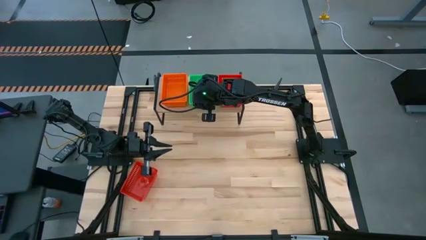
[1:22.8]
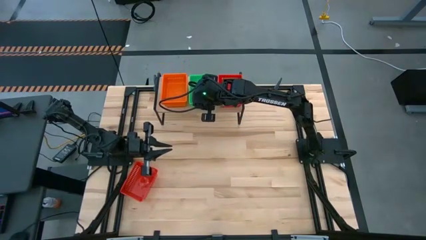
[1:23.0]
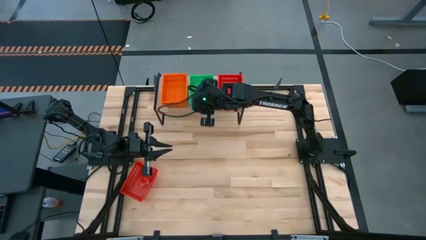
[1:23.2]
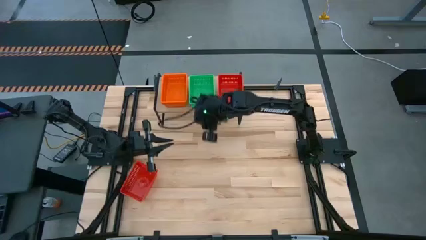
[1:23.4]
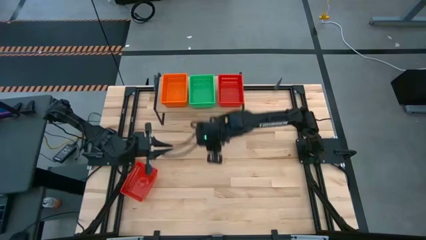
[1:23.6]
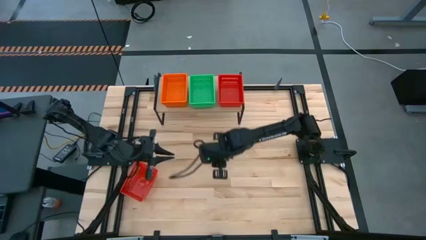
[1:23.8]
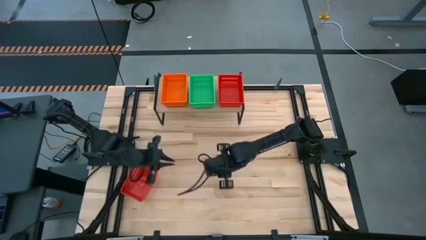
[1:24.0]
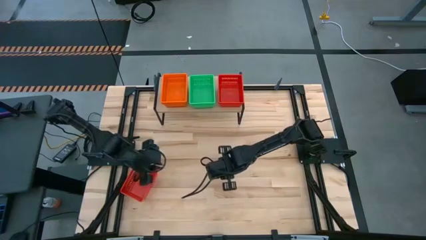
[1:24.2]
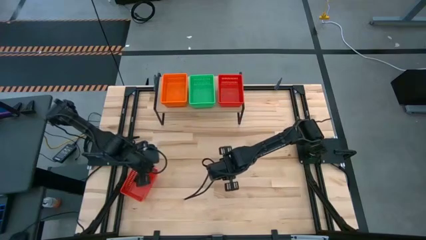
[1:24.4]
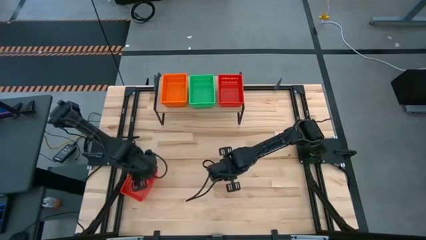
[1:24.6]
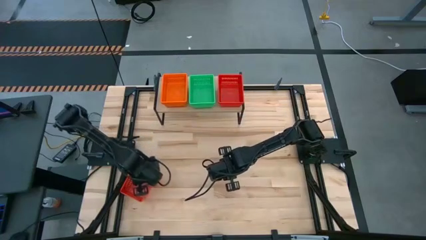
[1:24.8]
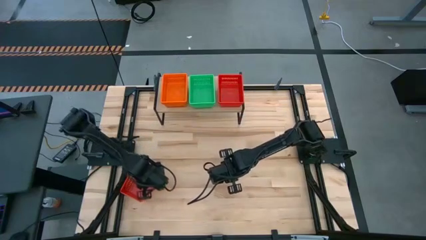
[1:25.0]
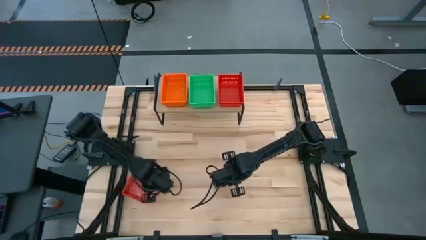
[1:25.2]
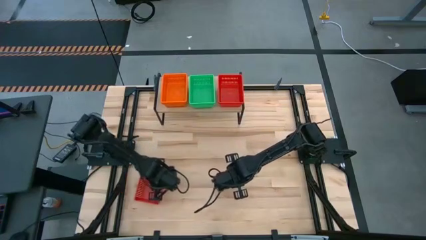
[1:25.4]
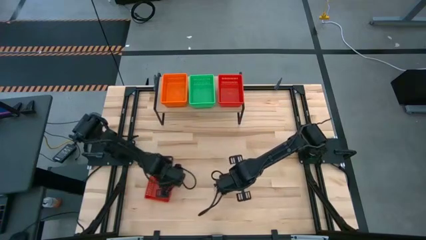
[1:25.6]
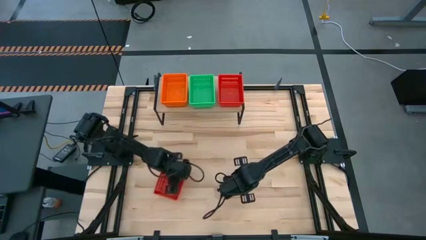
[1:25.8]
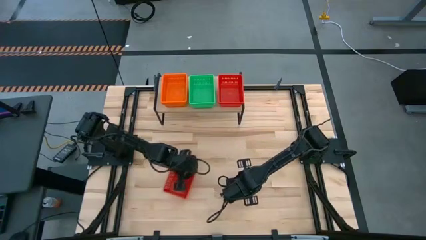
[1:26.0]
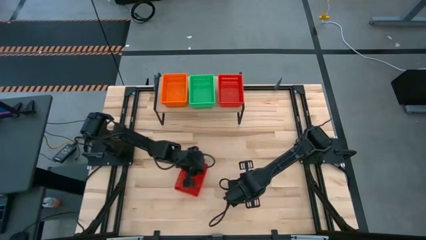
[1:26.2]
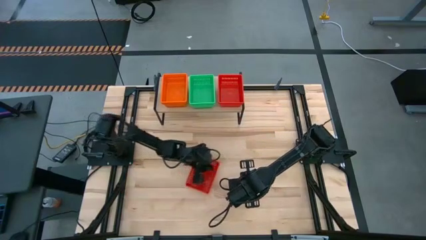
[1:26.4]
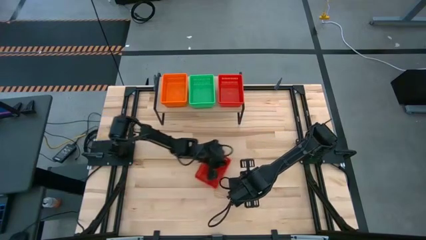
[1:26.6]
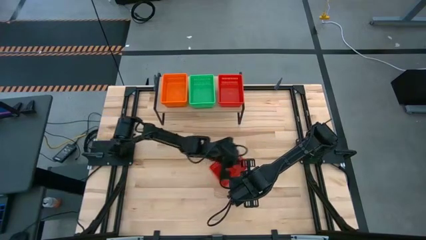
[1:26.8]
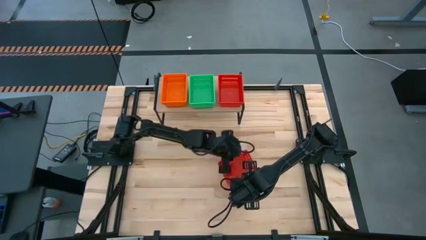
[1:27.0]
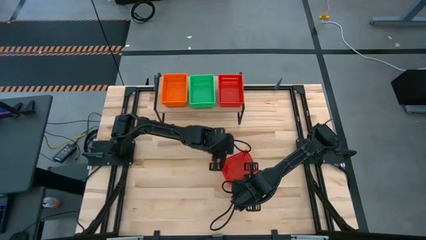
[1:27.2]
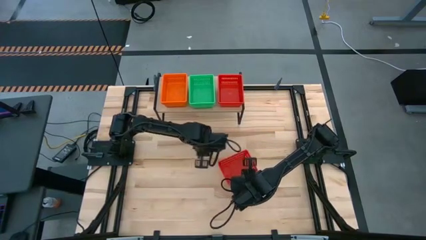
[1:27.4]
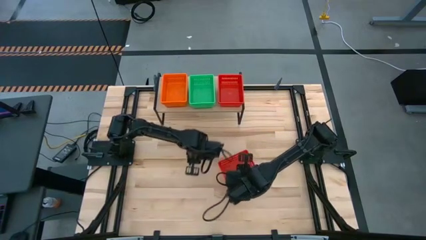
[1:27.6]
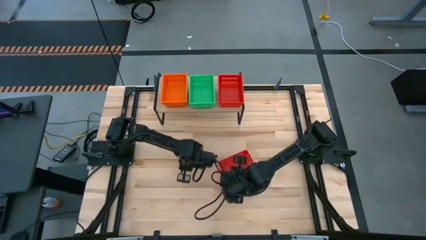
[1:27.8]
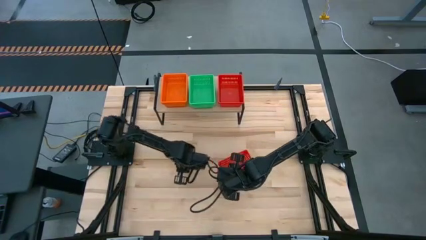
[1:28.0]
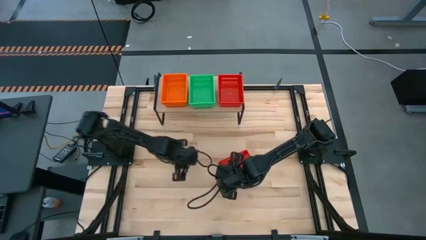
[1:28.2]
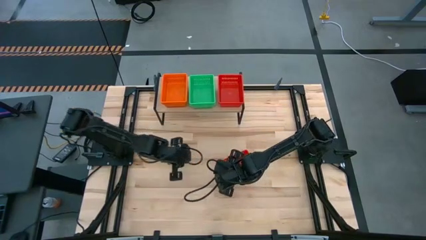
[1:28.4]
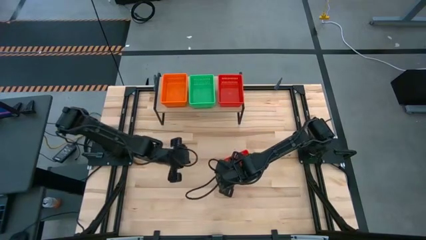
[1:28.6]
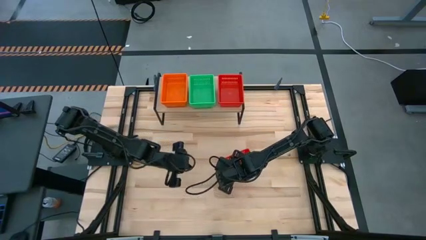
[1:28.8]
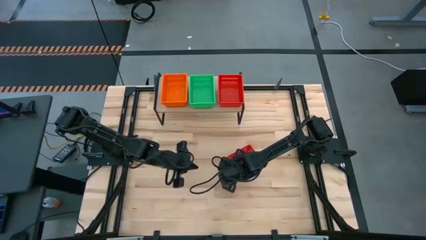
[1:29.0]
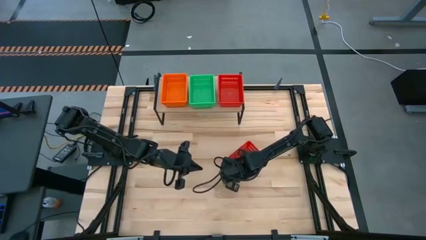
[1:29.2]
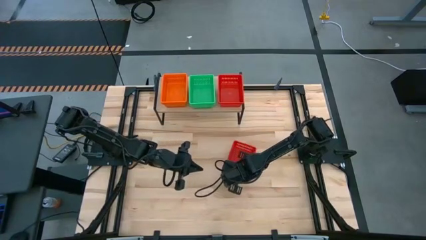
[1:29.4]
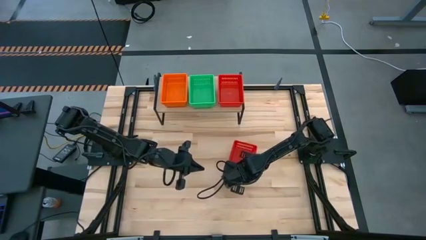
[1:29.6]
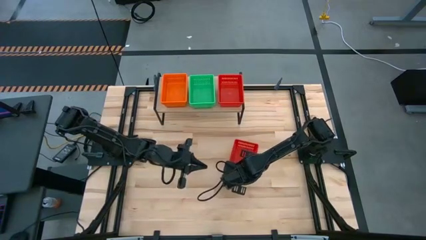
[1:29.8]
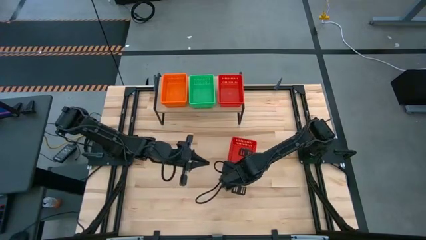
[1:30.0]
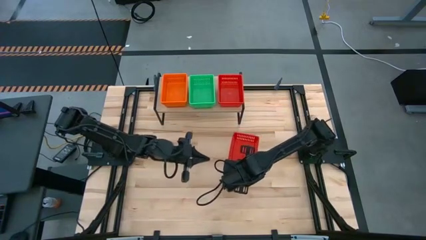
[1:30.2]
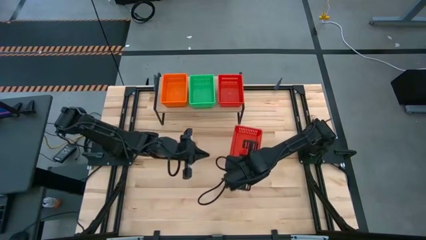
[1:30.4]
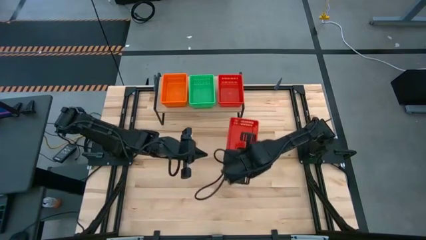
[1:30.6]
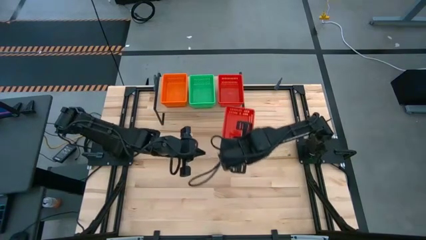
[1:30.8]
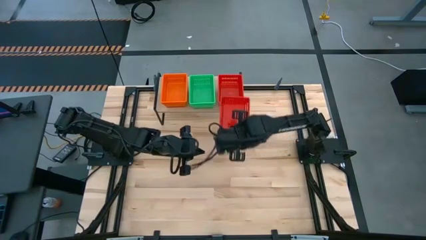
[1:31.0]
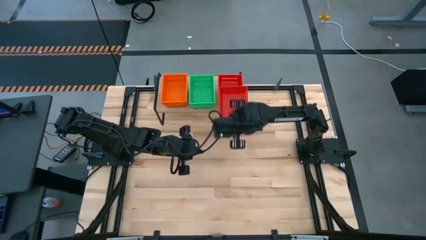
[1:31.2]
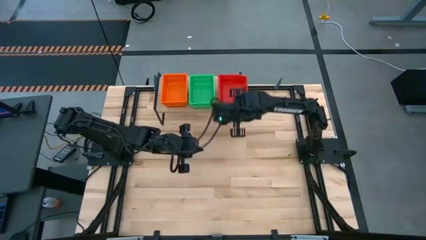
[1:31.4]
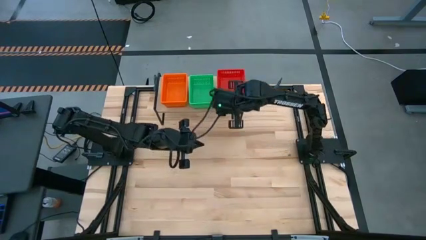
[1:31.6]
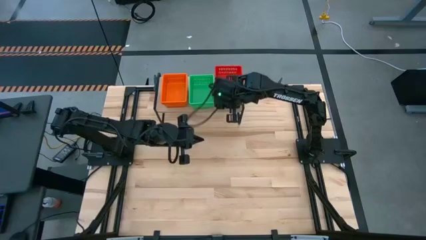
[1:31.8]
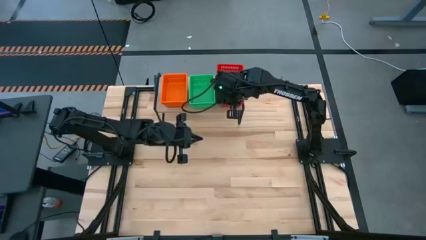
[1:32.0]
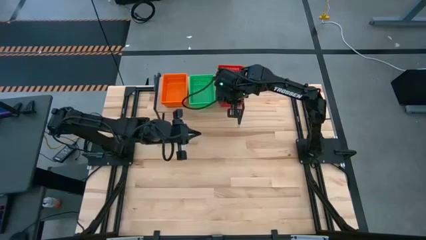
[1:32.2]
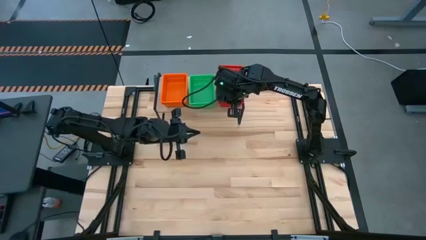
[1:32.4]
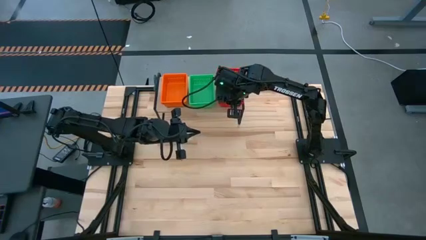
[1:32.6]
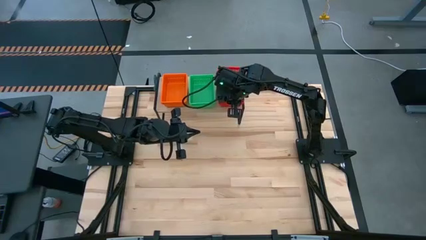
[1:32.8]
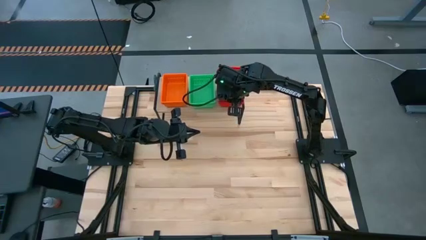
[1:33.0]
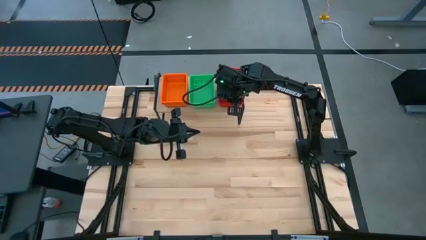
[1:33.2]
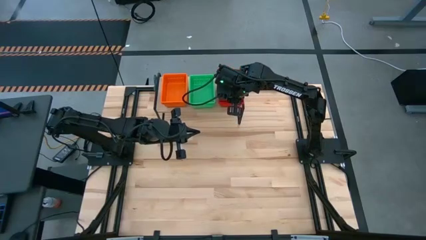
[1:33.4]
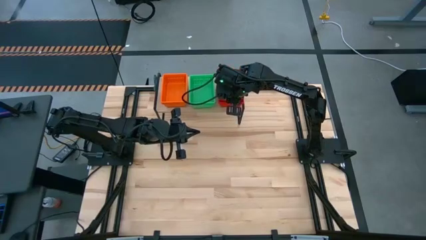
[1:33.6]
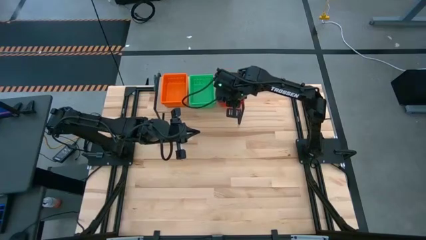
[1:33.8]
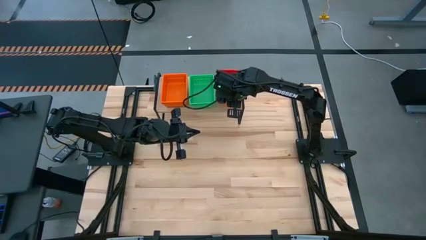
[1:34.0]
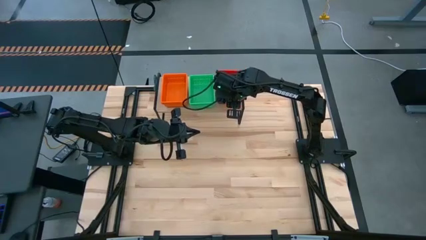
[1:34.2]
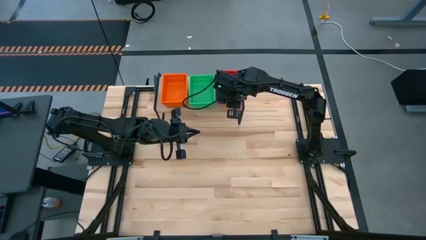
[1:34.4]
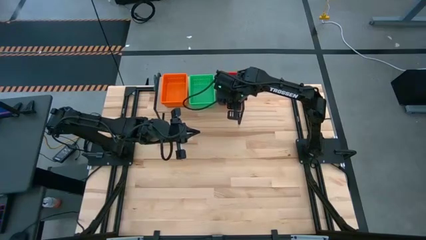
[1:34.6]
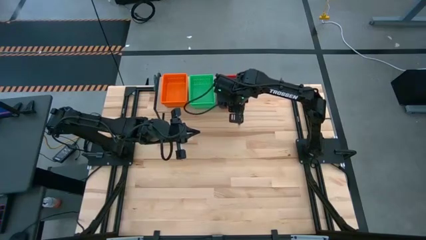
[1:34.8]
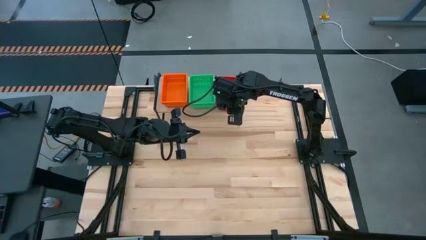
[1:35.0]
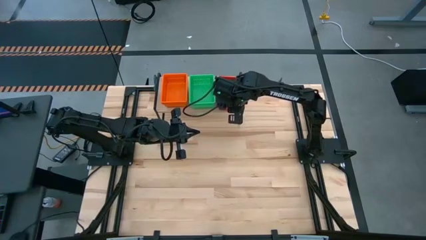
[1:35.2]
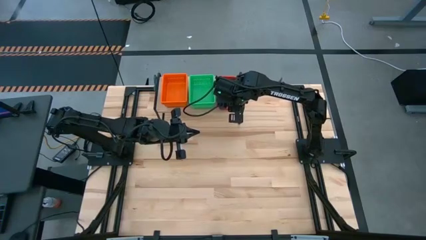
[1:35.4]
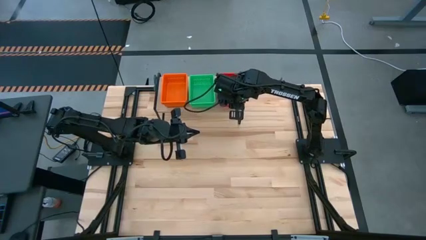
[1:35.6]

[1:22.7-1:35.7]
Task: Stack baskets on shelf by color
Stack the red bin on the red bin on the shelf
